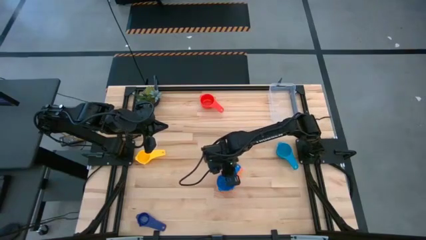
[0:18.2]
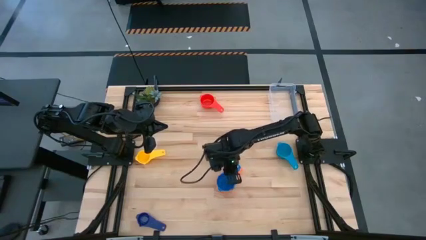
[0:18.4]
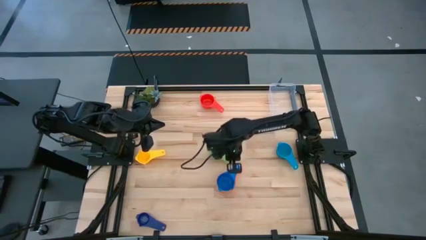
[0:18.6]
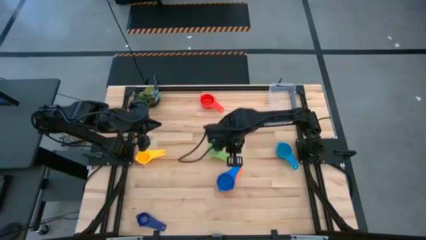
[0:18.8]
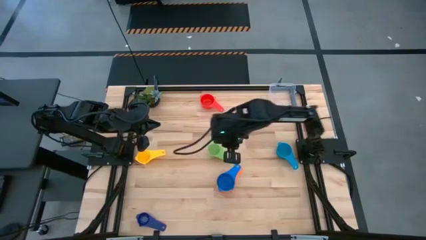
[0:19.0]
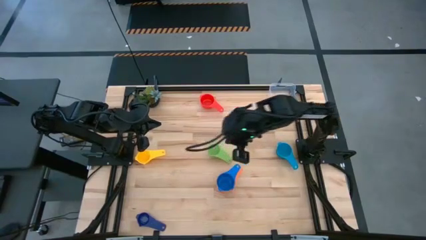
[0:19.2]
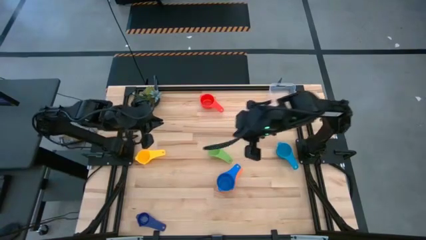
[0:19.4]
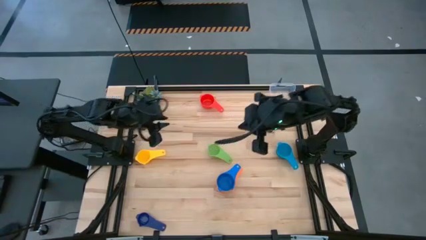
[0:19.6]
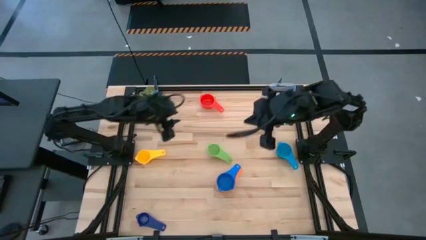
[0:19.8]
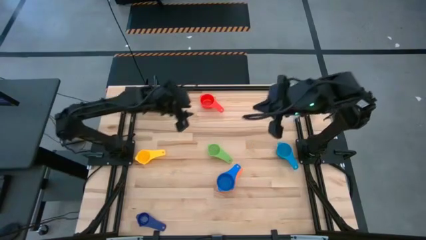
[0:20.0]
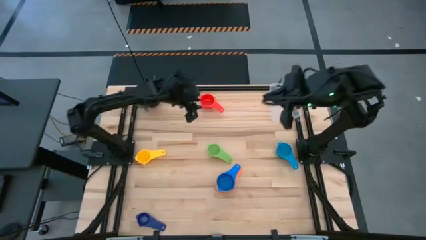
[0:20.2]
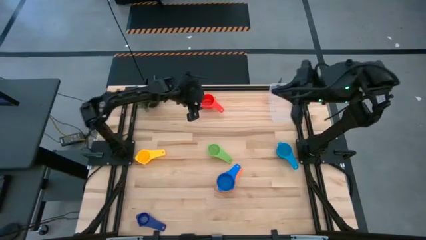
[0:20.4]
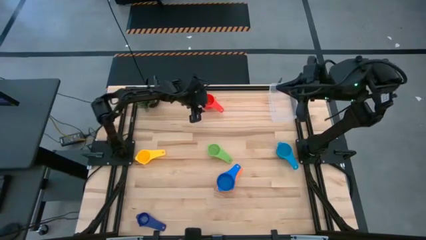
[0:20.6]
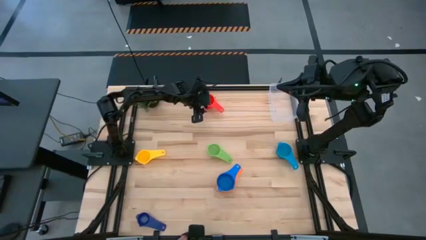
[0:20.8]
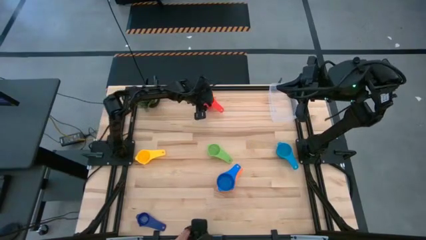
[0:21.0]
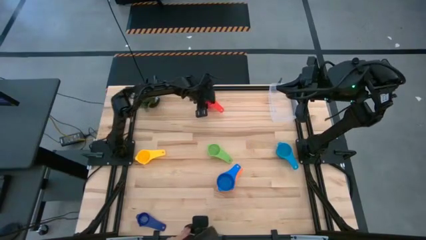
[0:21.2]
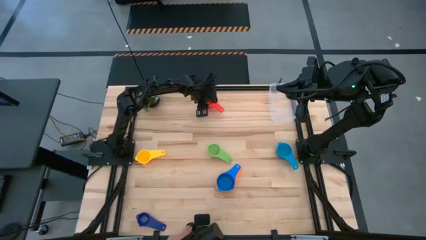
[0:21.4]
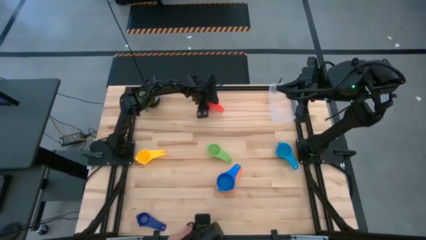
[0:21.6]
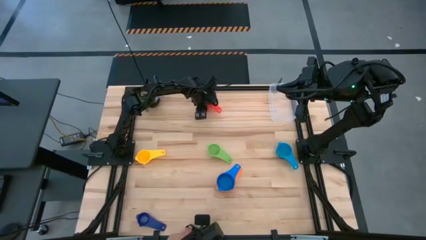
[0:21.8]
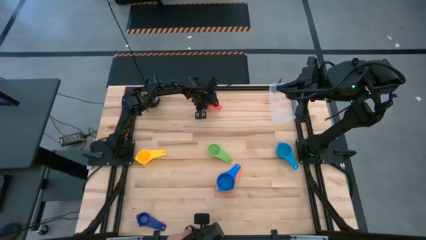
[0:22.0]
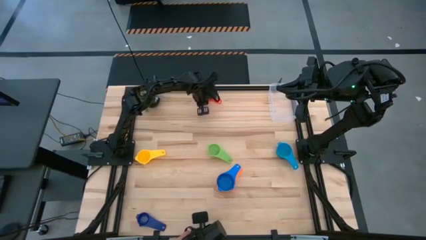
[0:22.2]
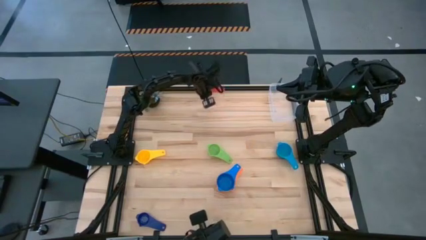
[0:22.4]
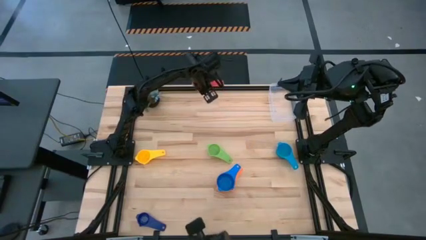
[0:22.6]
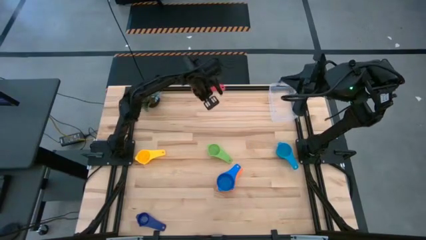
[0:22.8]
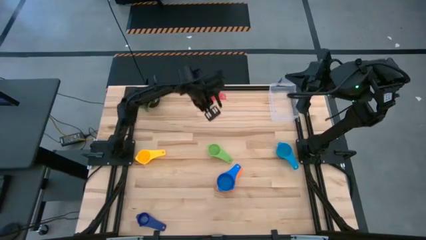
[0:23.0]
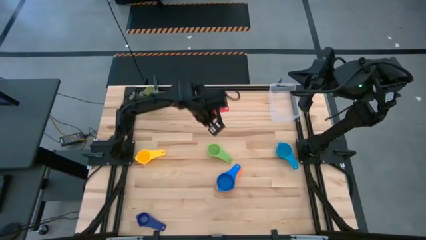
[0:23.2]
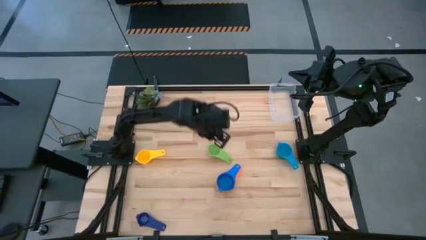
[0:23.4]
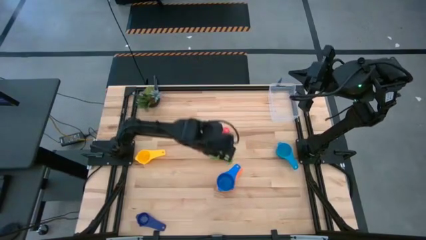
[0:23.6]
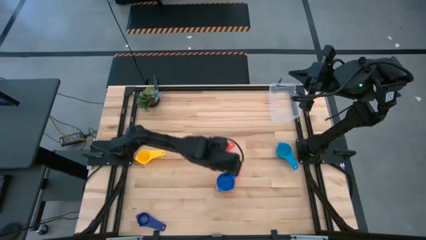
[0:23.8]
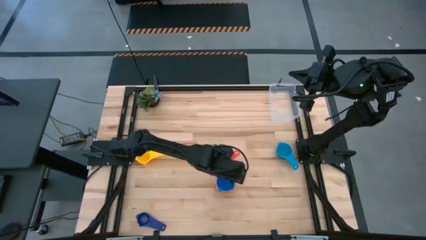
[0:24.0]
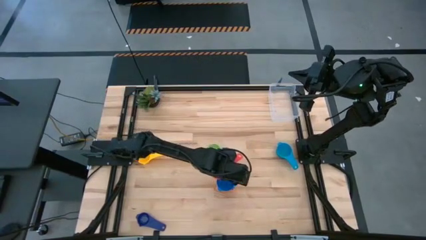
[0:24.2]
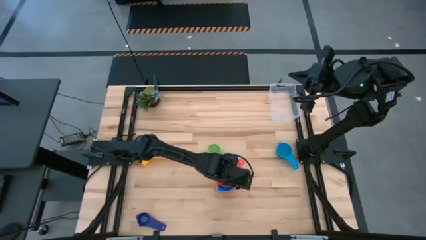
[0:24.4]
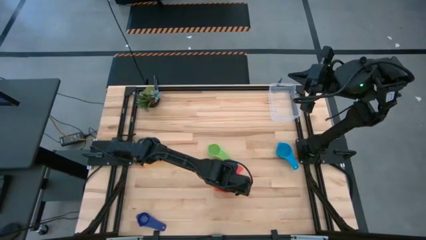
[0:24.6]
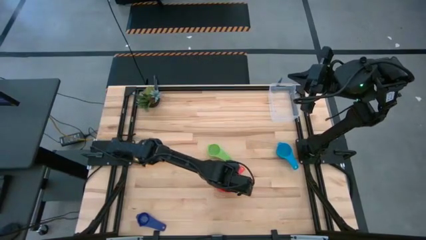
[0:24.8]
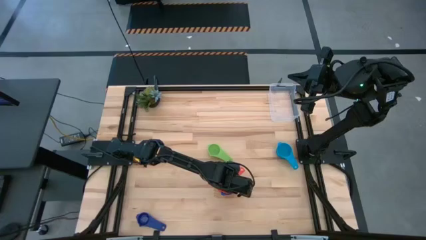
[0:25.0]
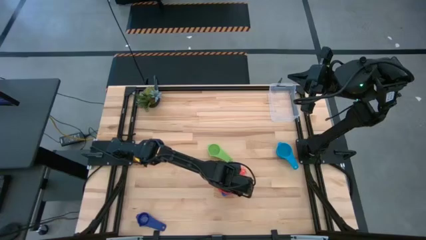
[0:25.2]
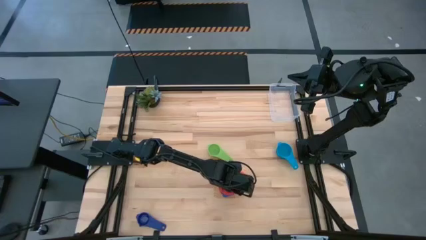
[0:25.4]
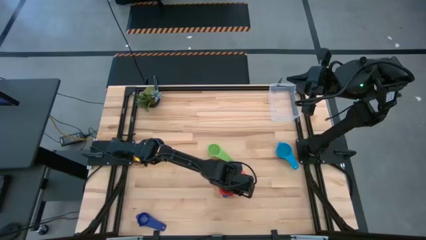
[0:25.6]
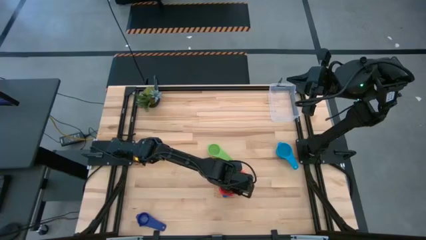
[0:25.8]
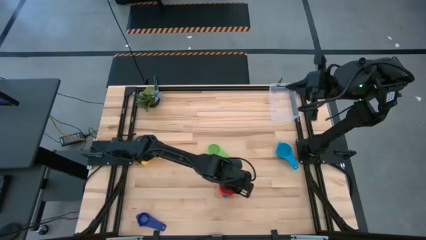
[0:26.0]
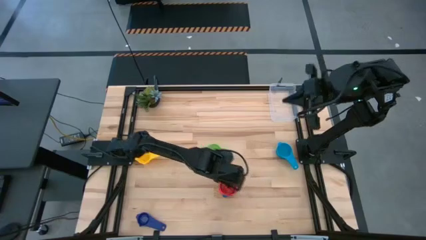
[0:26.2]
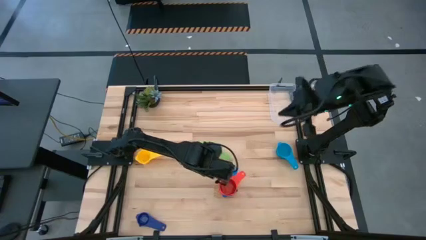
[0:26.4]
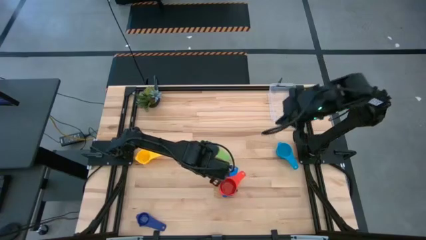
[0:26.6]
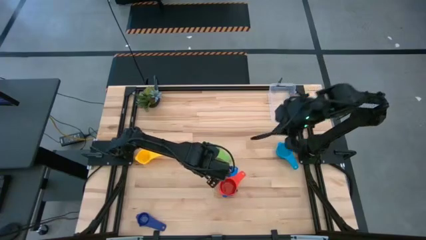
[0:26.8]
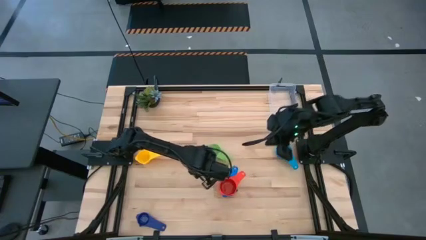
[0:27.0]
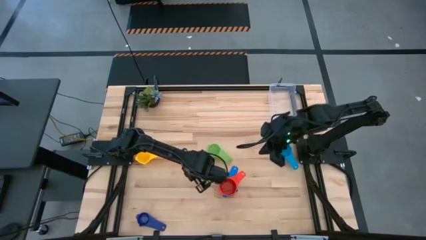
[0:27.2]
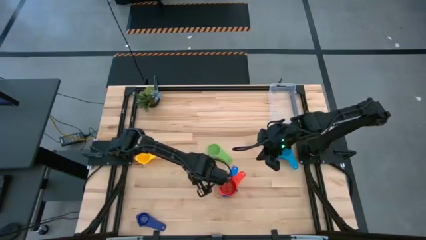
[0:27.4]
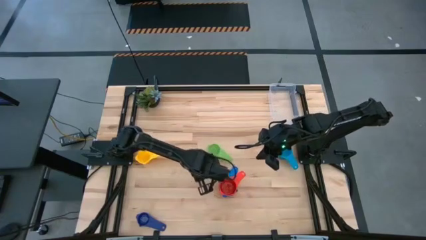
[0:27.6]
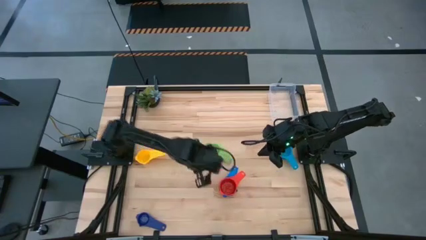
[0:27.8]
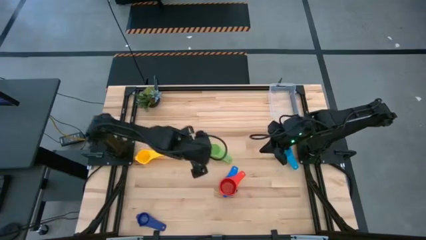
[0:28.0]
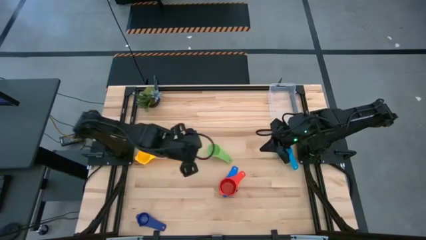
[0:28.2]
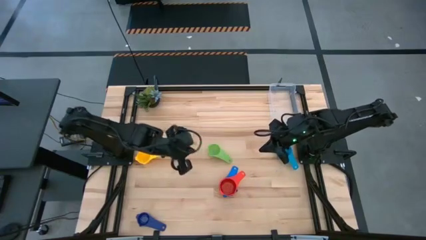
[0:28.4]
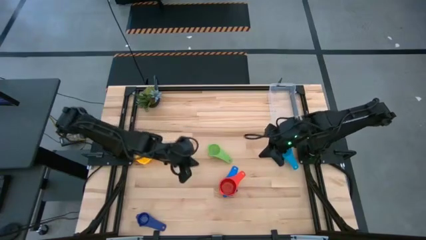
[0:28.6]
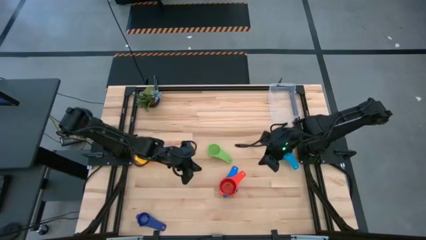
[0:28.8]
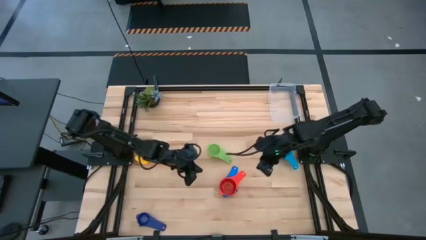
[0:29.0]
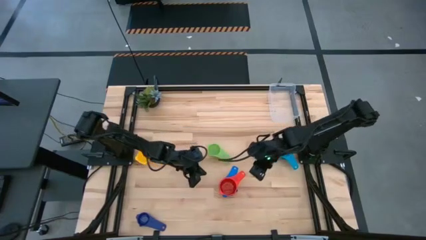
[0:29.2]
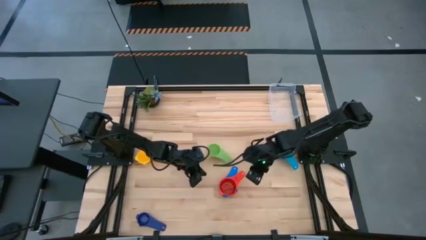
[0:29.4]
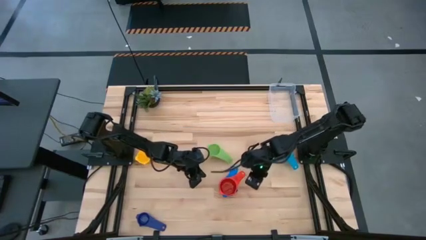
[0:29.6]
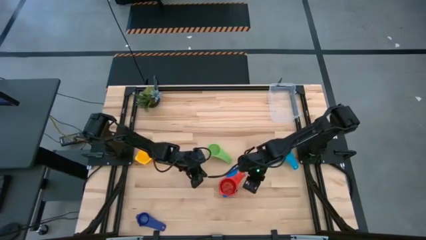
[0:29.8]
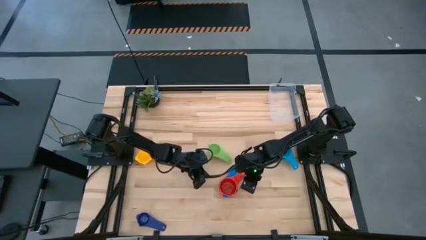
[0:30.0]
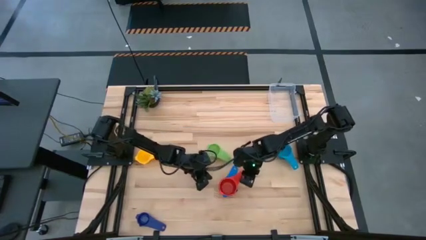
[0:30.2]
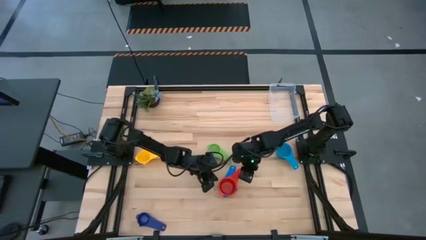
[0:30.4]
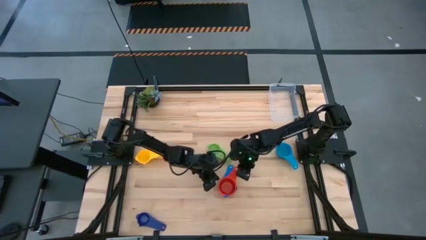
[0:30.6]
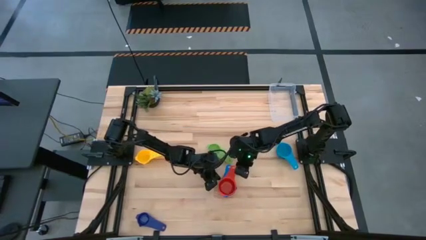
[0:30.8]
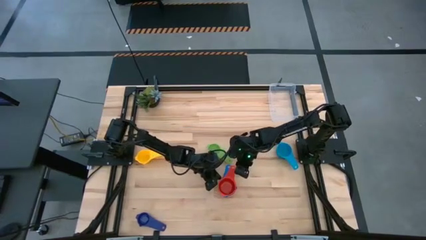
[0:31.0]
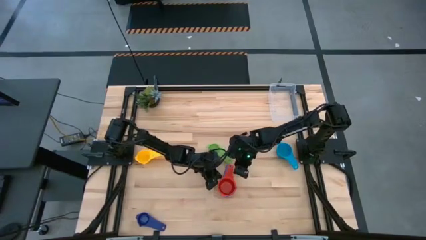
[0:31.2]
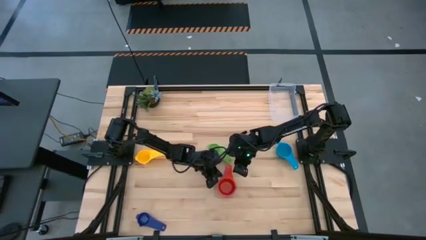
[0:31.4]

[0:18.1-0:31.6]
Task: Nest measuring cups in basket
Stack the red measuring cup on top of the light blue measuring cup

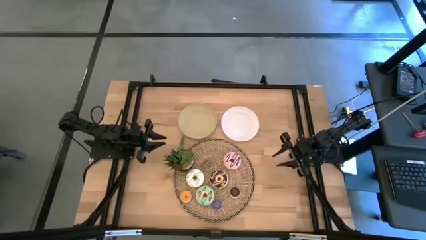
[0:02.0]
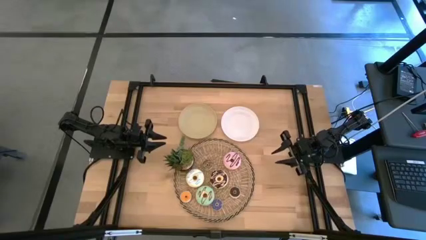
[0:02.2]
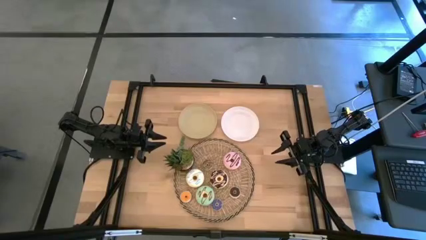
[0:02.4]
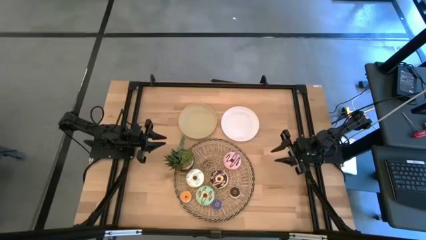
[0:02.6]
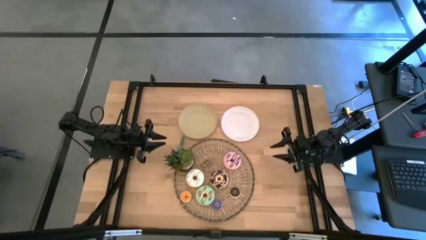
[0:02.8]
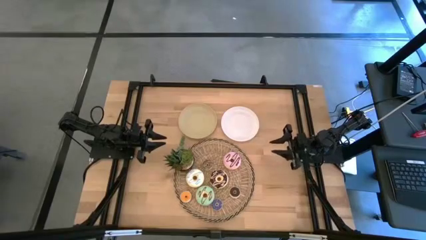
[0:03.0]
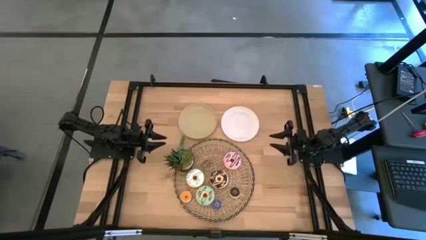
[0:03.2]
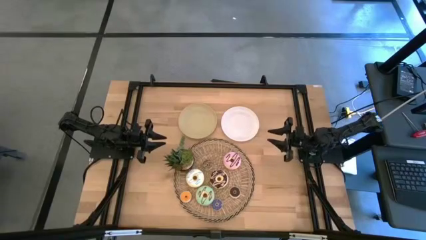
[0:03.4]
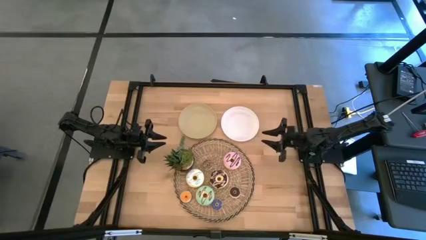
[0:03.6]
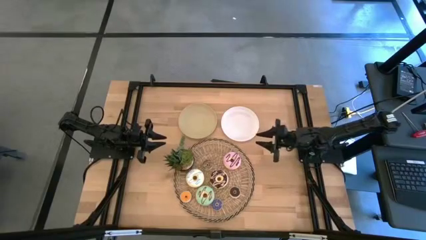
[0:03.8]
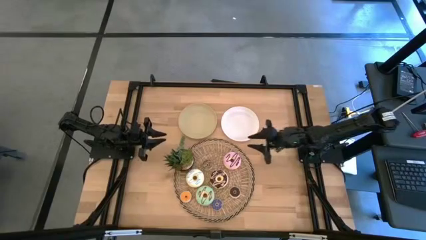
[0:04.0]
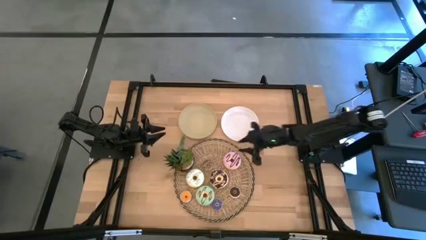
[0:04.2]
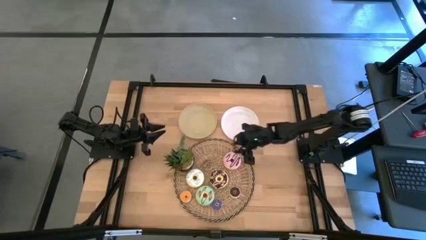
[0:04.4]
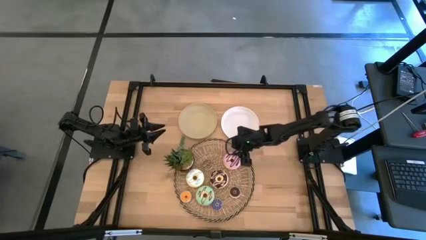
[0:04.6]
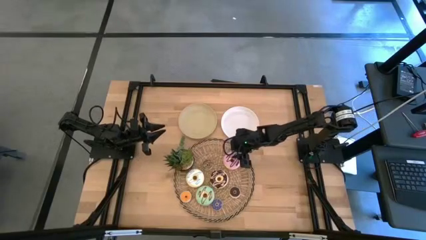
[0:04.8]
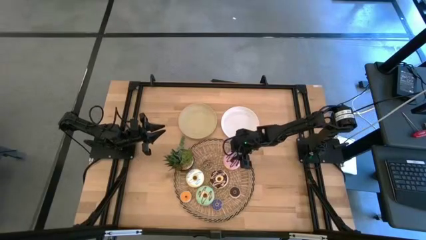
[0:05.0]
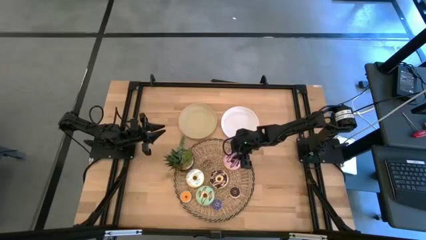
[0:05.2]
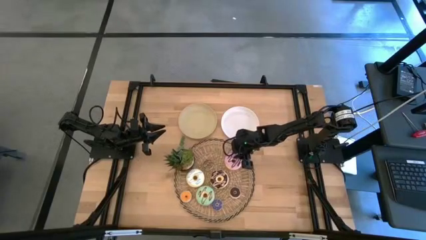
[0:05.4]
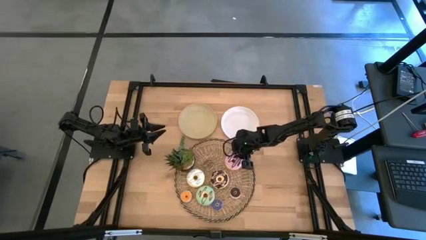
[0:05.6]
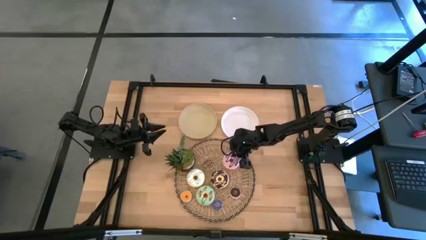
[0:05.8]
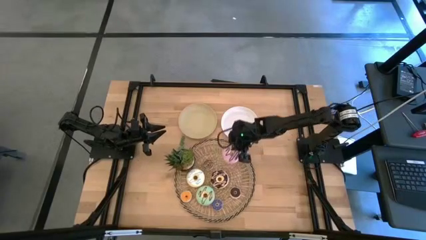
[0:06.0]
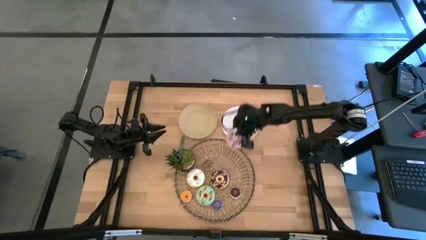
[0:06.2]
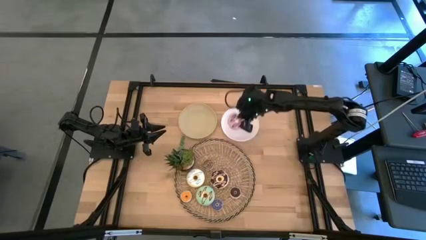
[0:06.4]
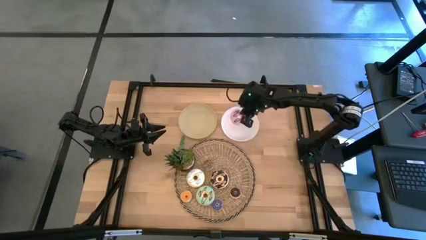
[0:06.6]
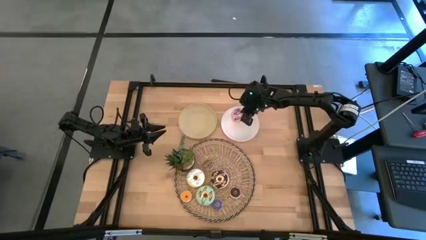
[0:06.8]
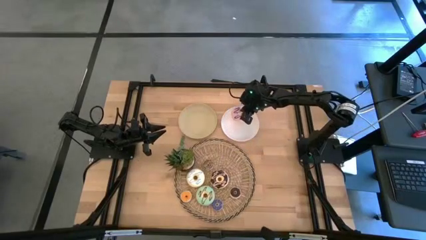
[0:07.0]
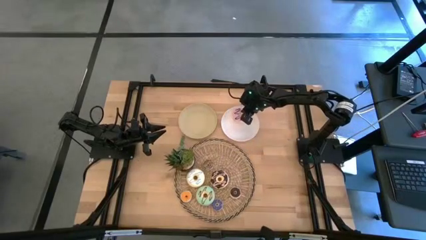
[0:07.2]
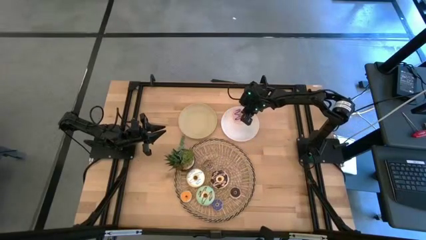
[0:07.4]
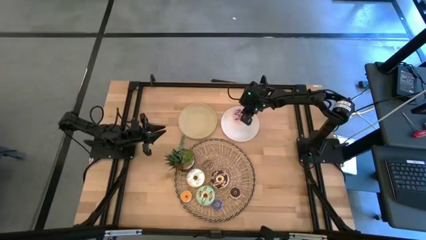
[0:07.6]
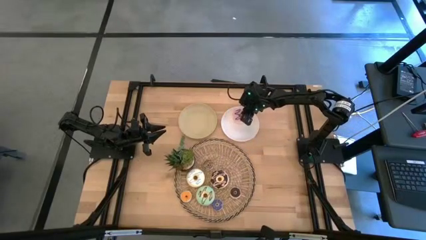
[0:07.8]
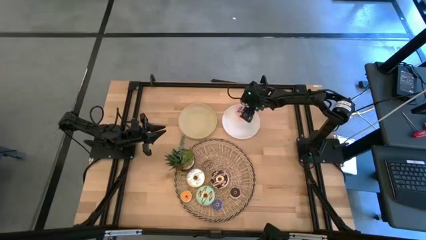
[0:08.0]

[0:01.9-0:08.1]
Task: Pick & Place donuts
Put the large pink donut on the white plate
